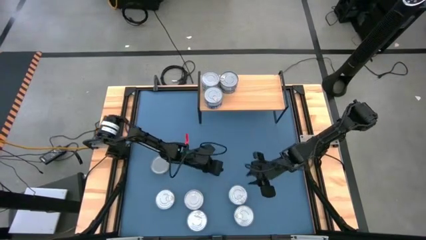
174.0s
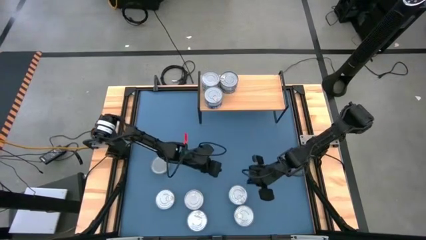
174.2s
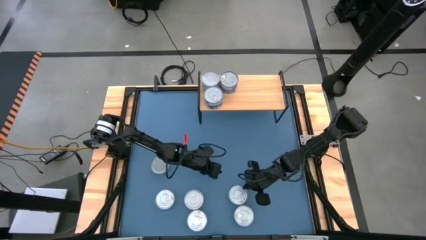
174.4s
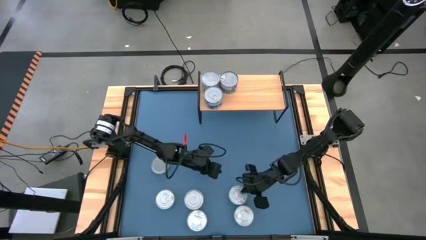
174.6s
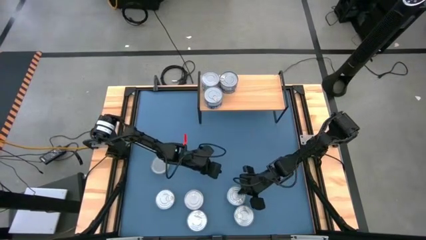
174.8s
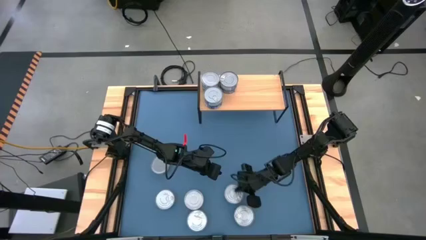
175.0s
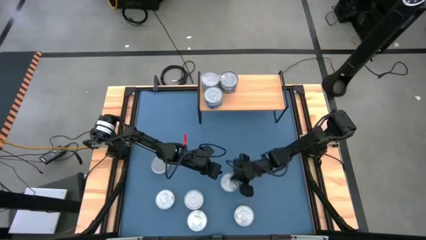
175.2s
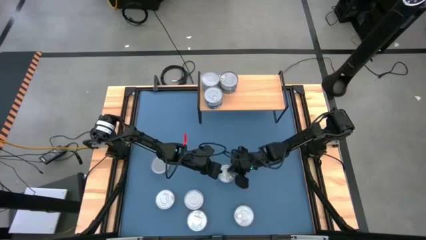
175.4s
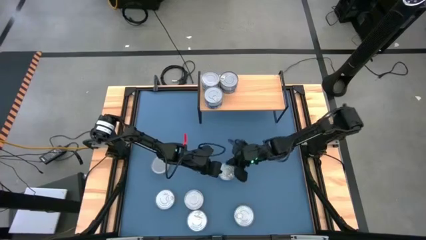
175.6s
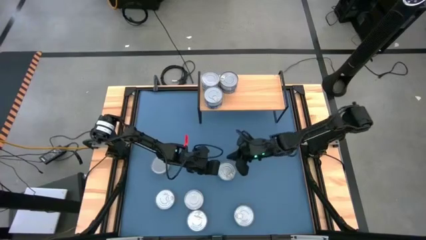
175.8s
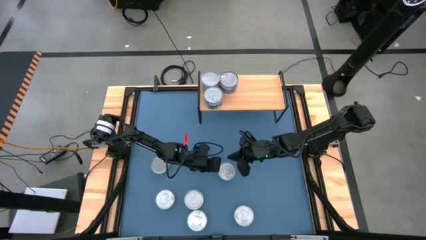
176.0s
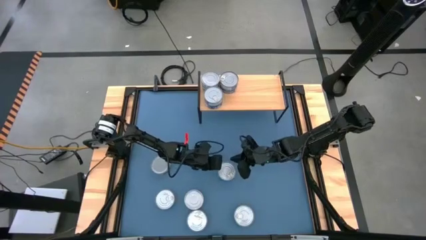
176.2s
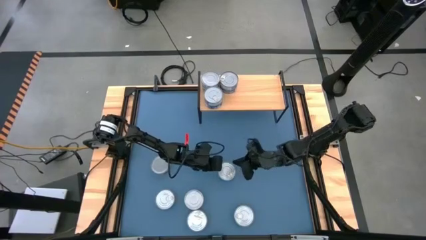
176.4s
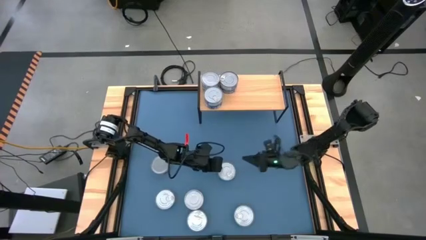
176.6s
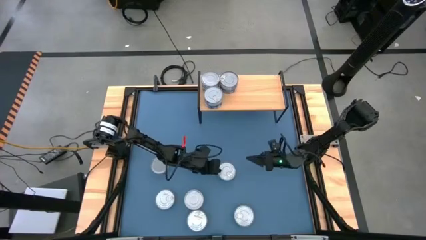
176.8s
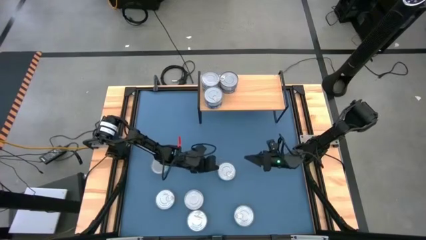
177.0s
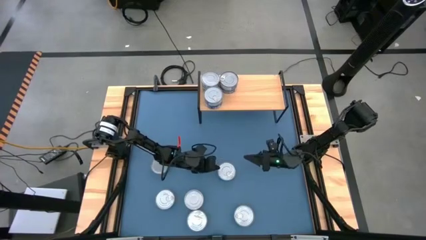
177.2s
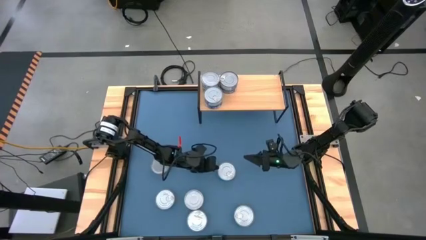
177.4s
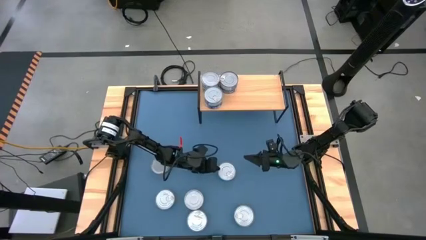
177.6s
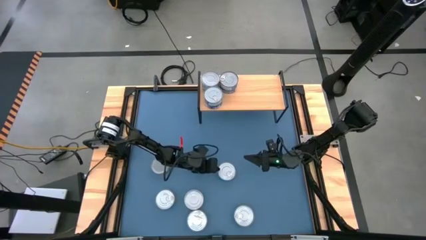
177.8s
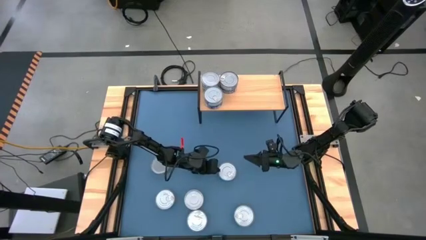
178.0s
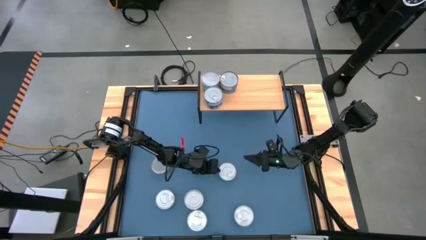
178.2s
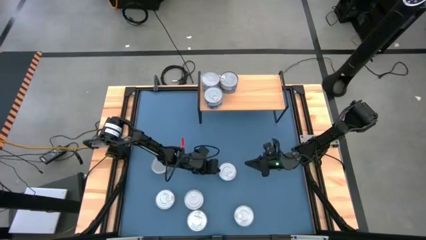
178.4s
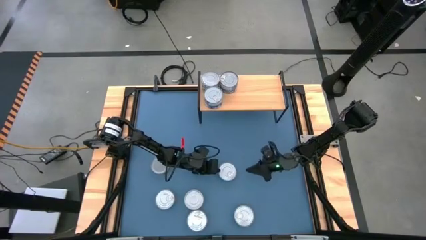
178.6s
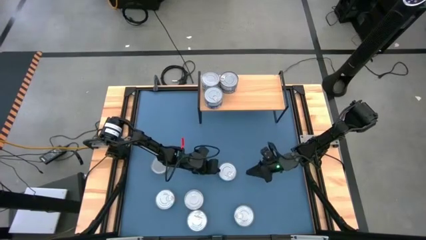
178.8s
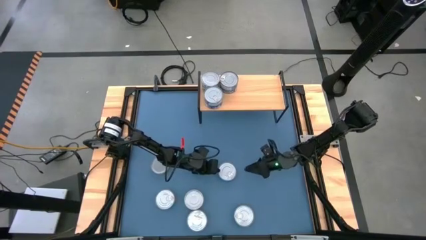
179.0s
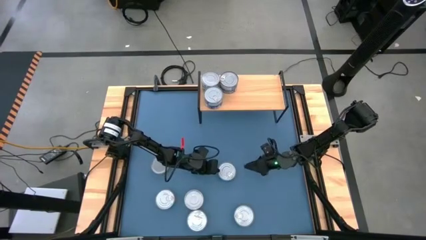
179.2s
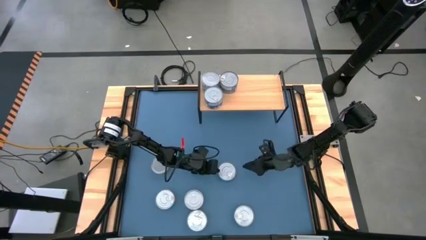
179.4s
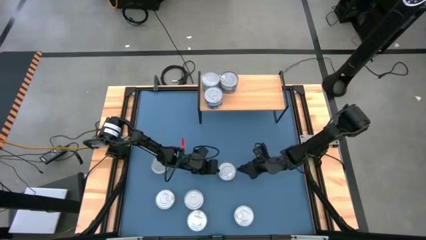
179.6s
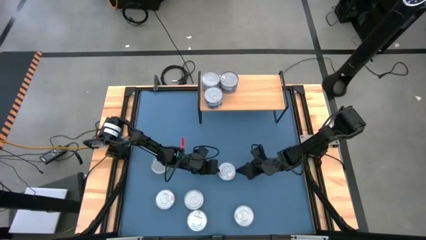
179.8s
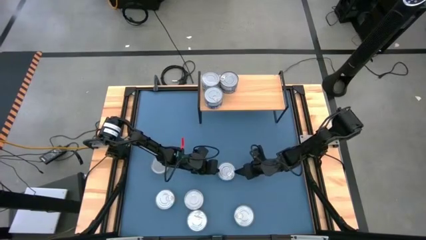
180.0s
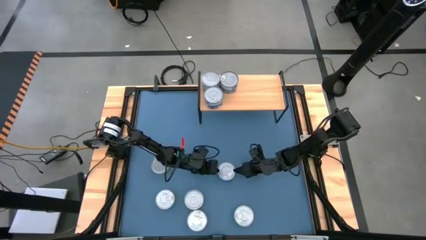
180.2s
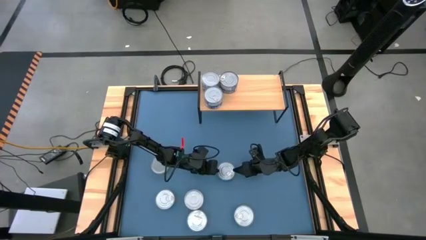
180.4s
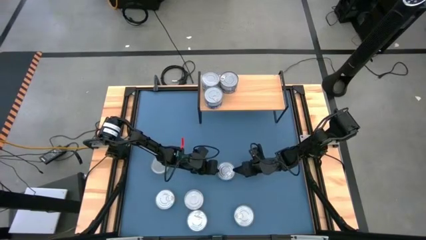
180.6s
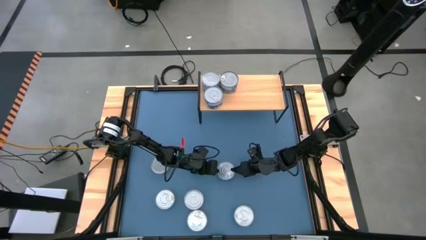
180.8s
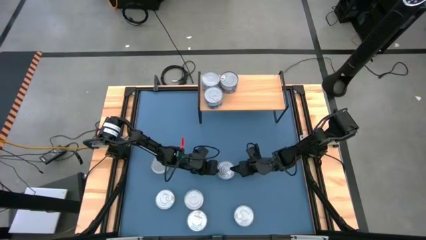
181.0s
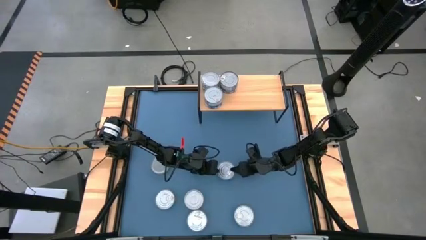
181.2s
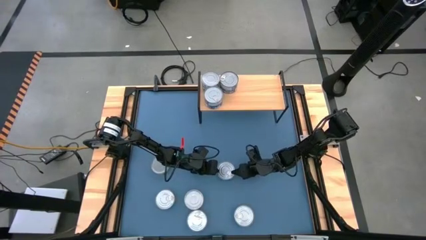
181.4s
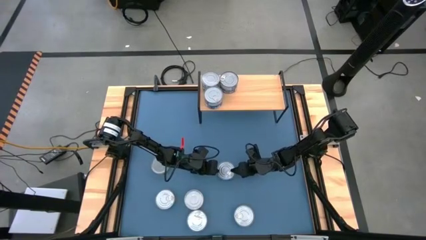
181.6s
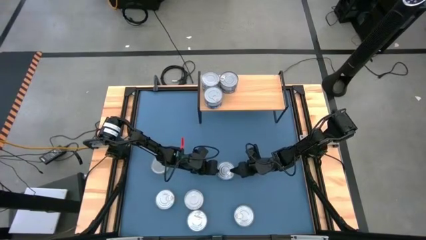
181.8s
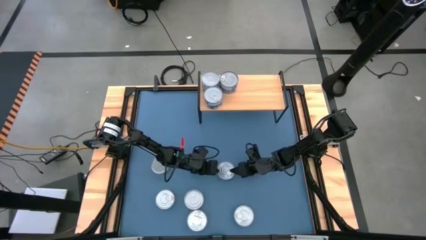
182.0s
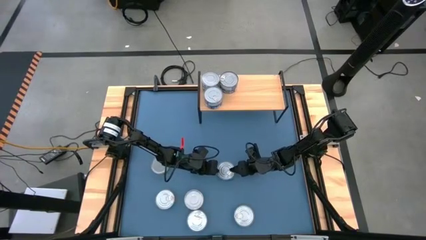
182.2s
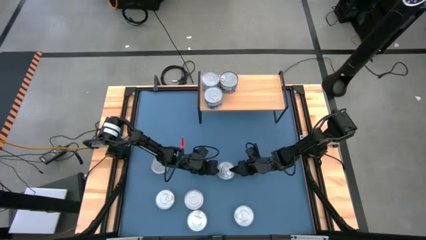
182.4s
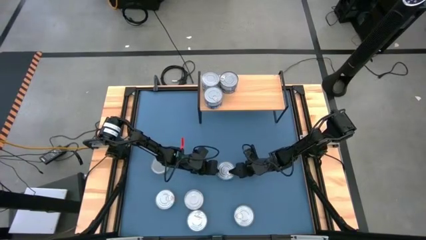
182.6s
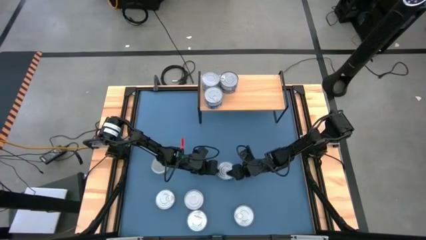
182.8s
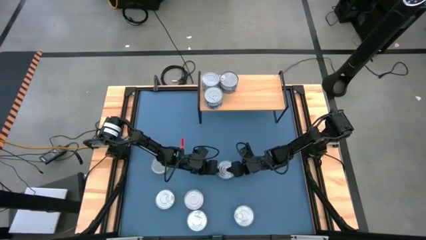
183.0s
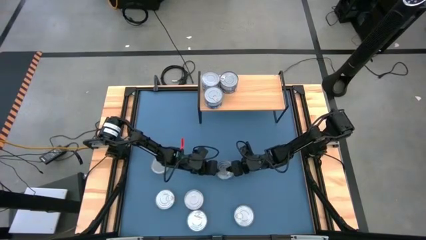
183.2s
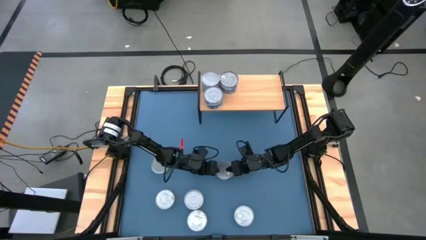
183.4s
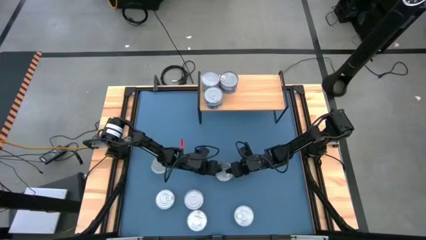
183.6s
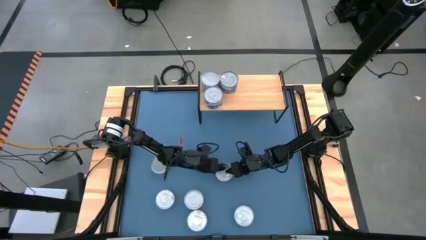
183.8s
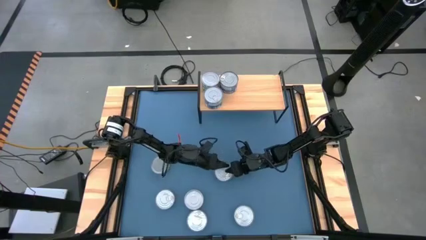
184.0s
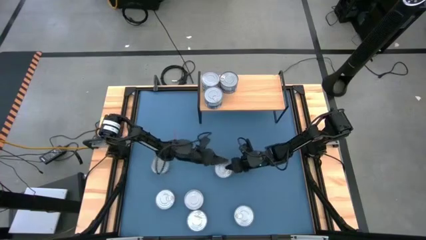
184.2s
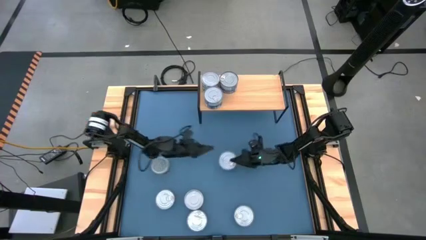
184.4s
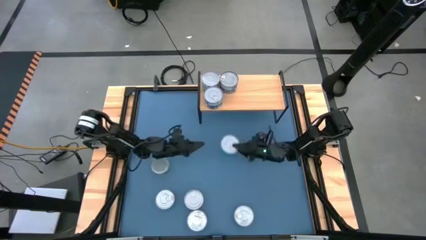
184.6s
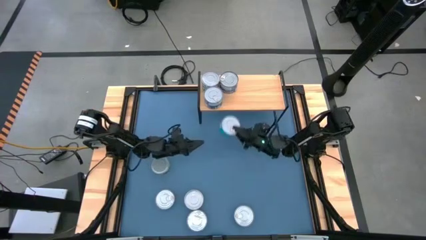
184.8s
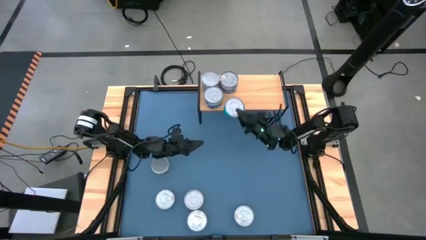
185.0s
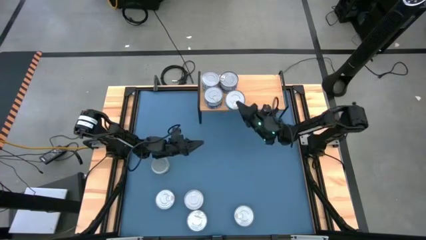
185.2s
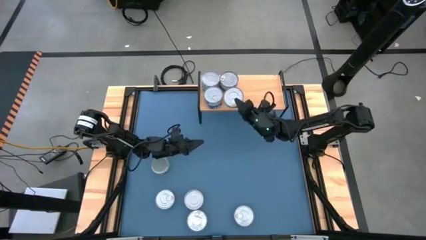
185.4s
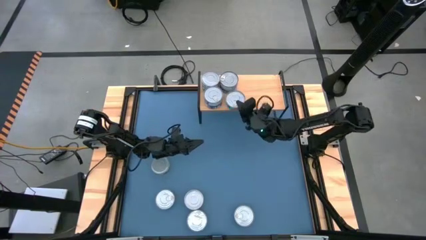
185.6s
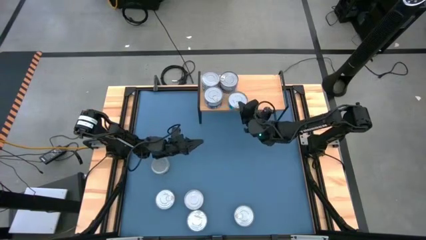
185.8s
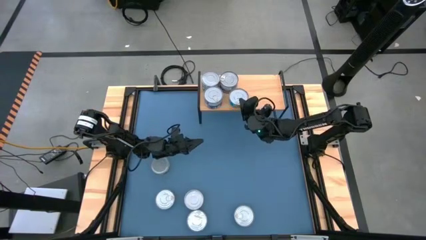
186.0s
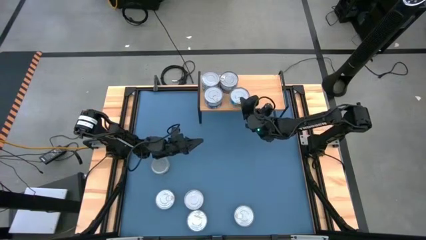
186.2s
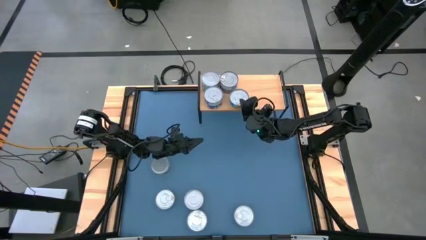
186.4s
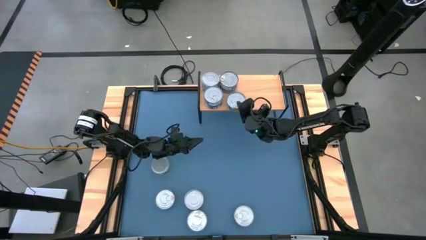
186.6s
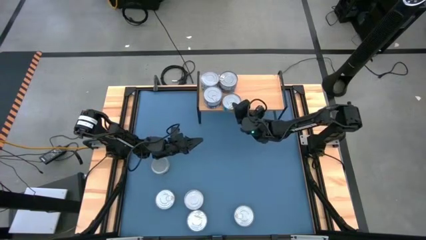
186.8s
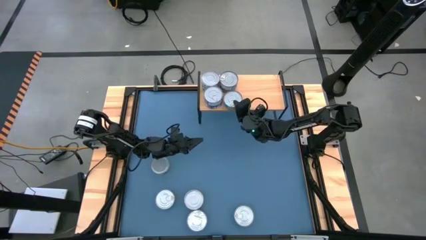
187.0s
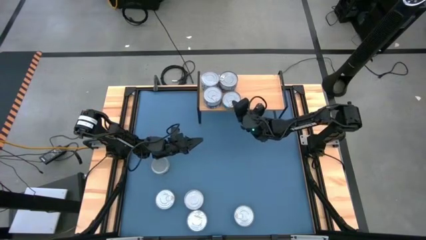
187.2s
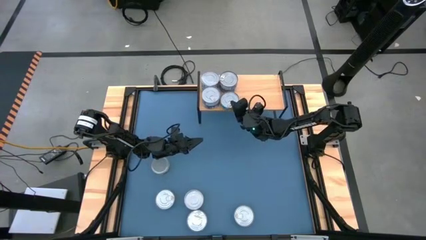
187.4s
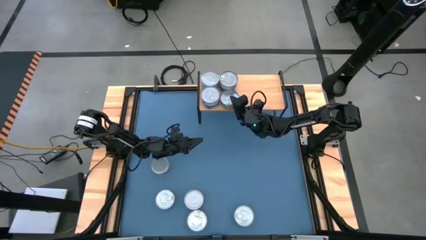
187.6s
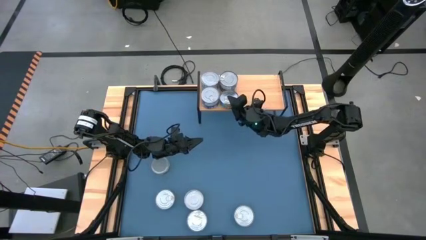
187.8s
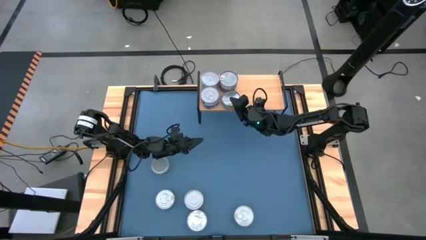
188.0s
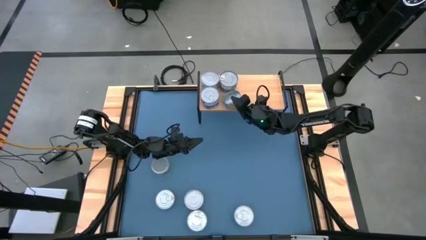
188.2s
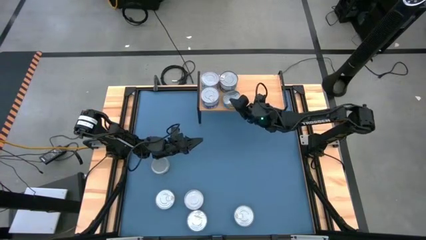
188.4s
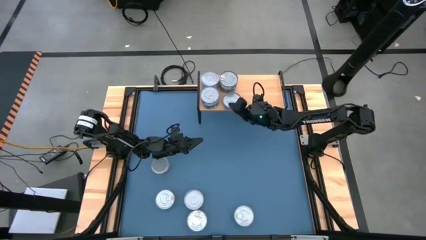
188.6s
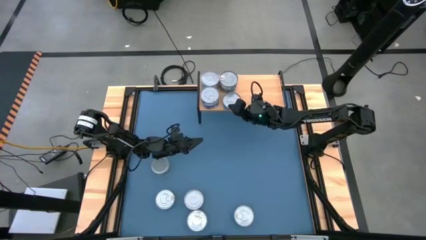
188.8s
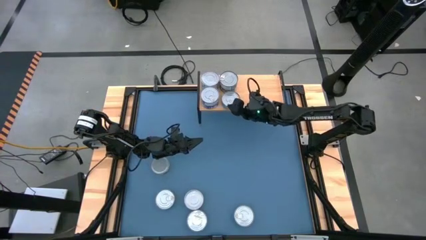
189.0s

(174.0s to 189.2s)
Task: Stack canned seafood by type on shelf
Put the yellow blue tuna can on the shelf

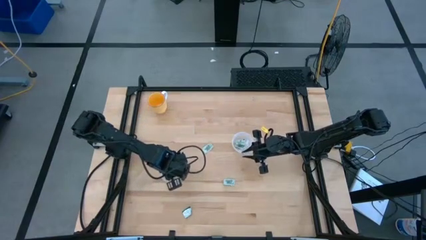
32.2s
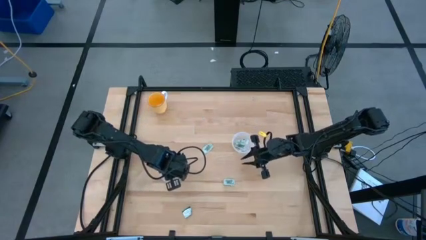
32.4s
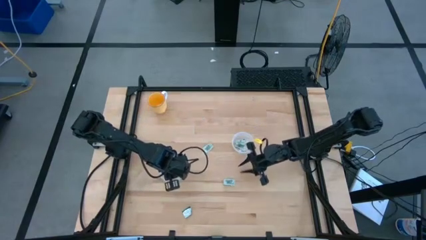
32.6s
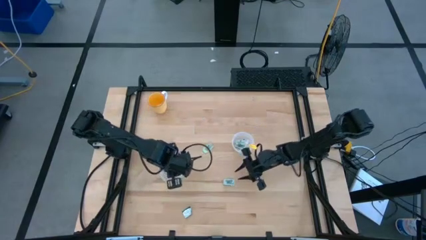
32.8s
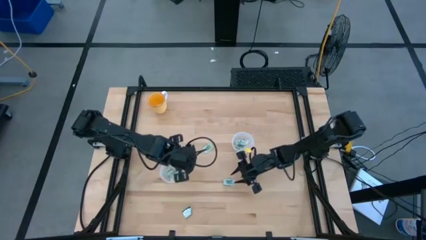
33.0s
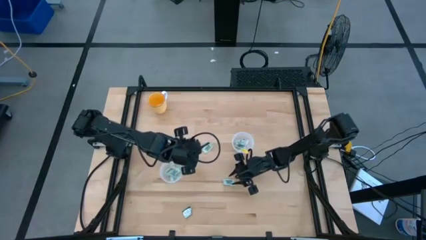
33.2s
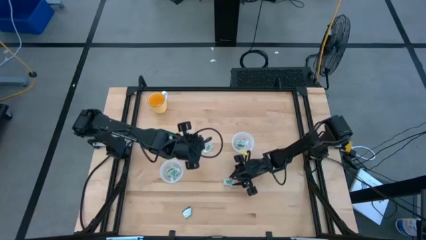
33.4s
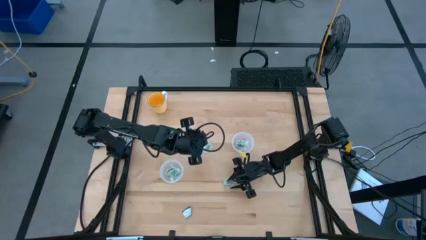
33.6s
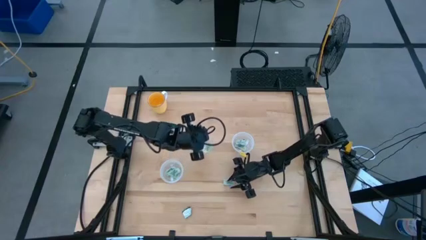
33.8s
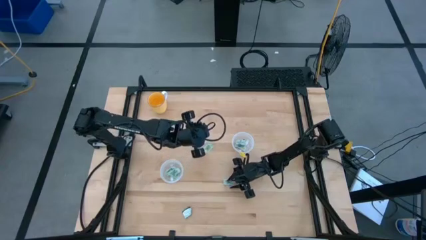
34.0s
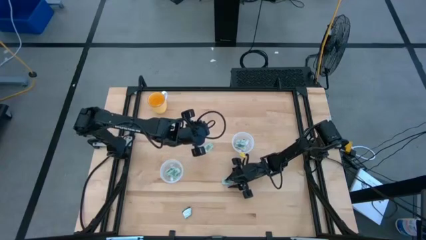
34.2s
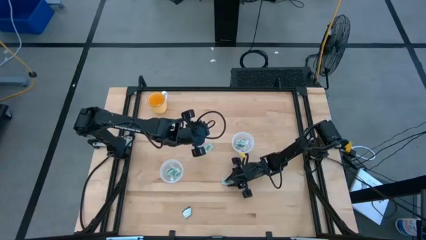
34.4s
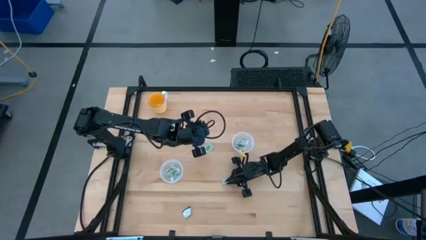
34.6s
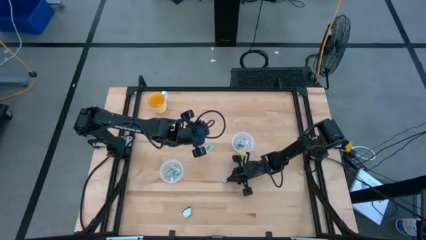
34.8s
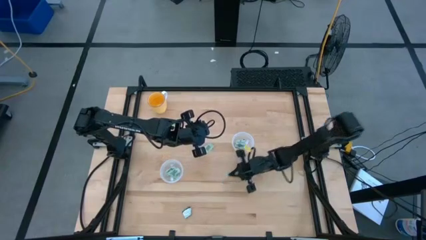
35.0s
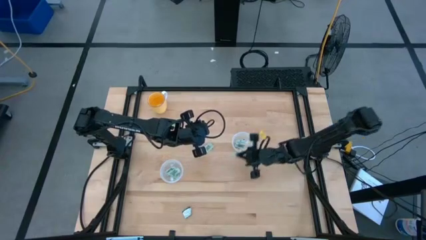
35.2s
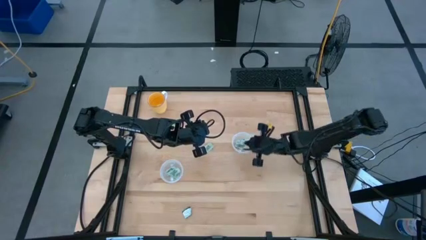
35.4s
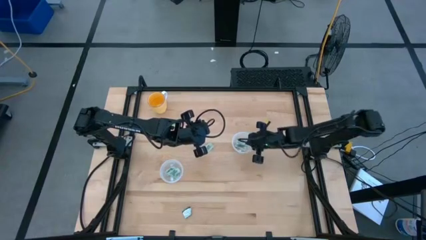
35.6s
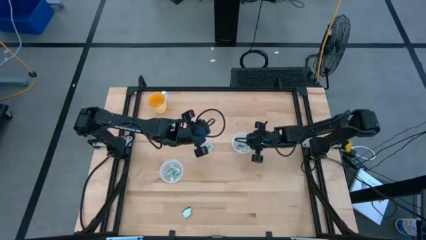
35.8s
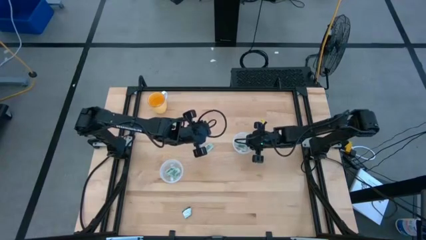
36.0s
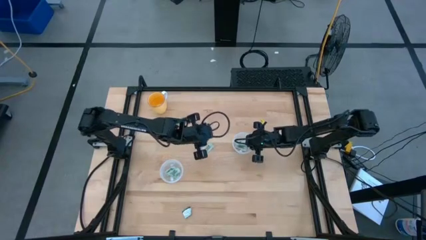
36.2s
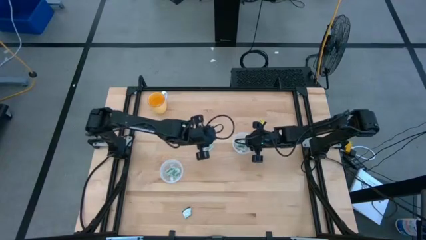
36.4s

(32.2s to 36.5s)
Task: Pick and place Stevia / Truvia into bins
Put the white stevia packet into the top transparent container
